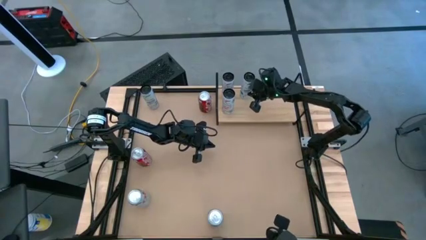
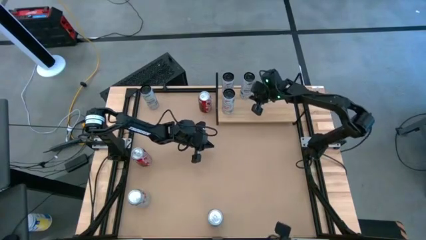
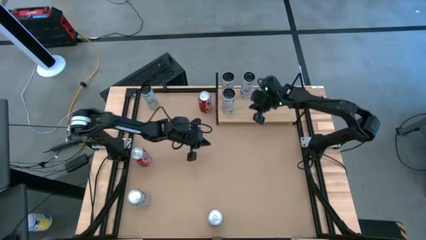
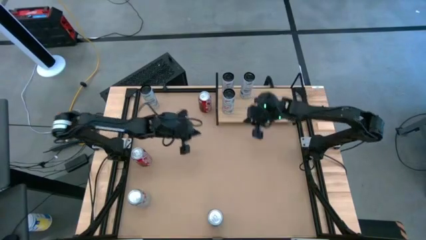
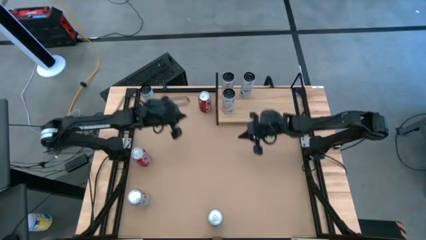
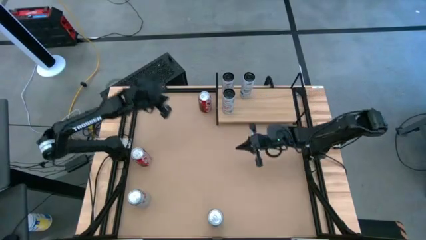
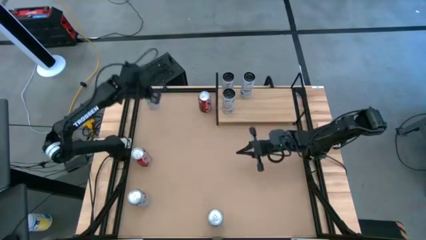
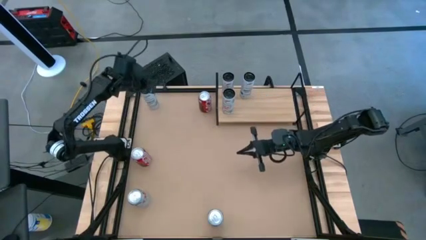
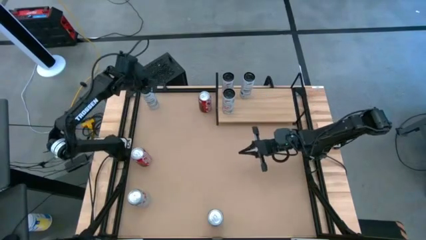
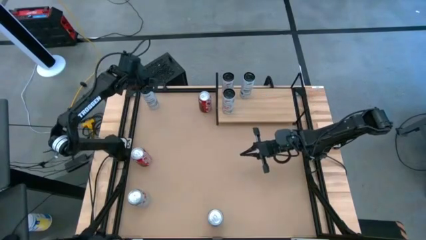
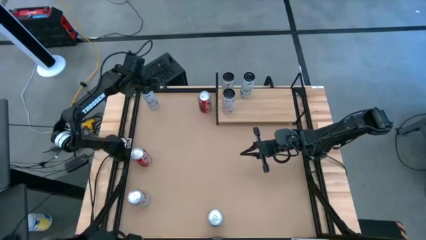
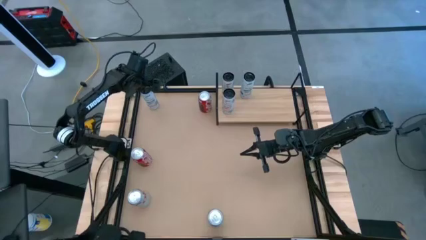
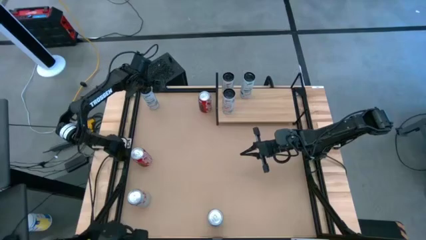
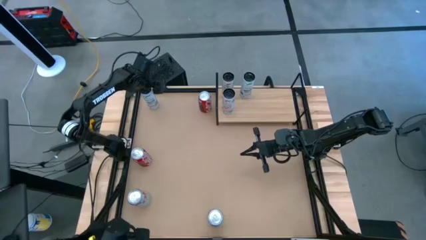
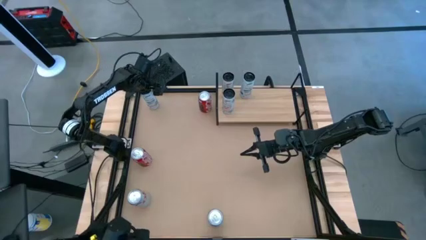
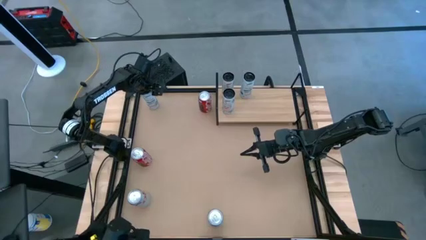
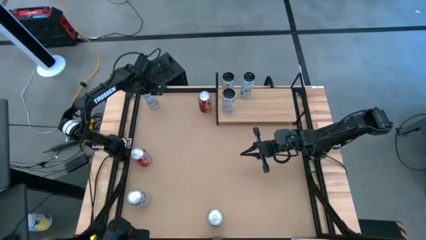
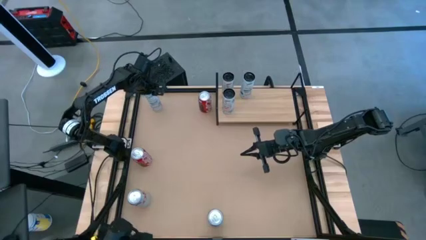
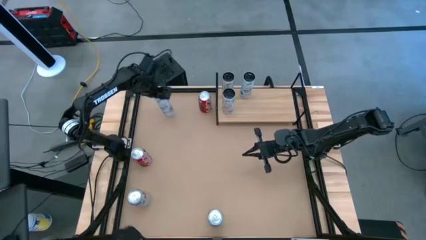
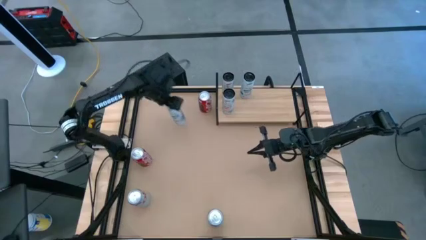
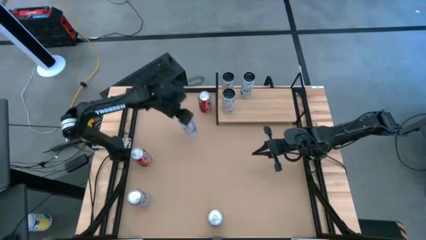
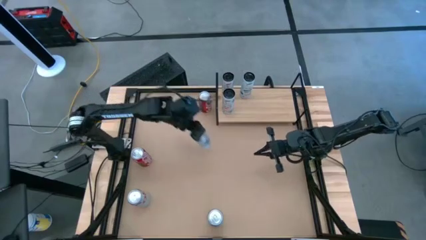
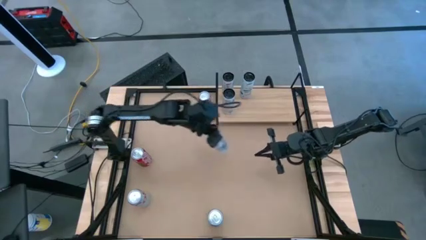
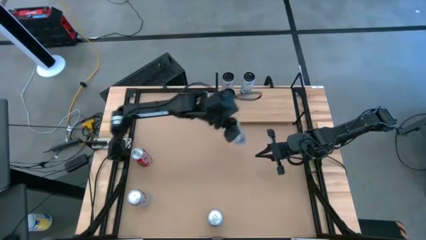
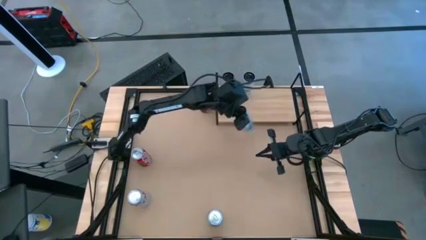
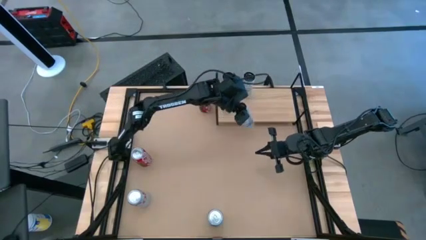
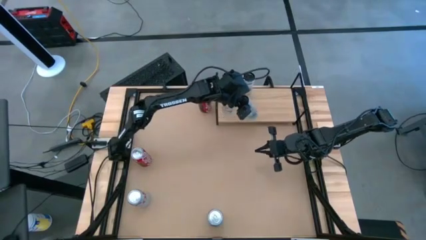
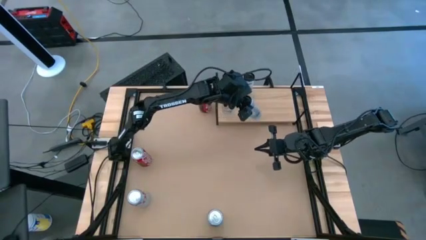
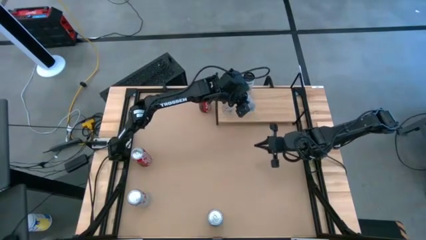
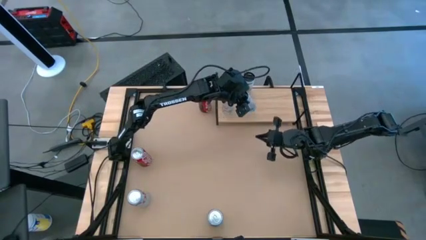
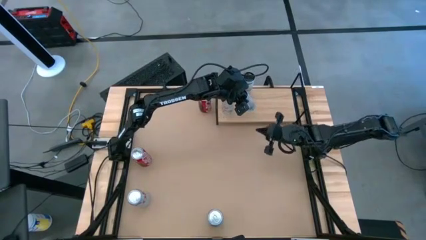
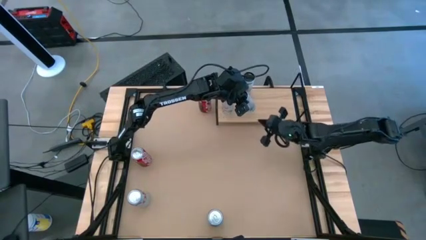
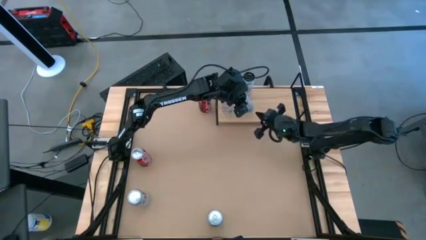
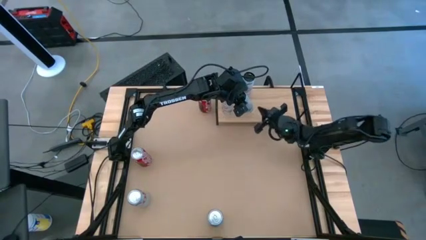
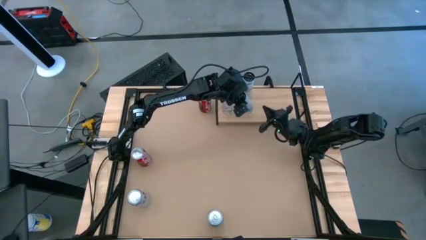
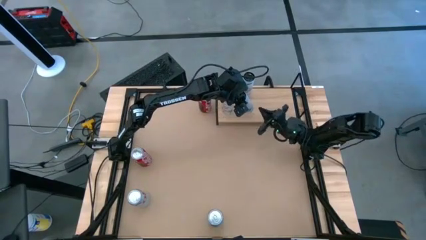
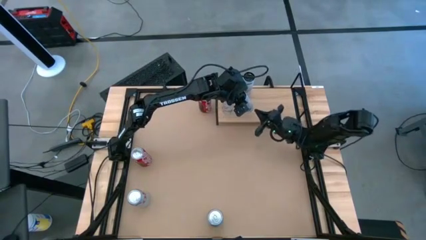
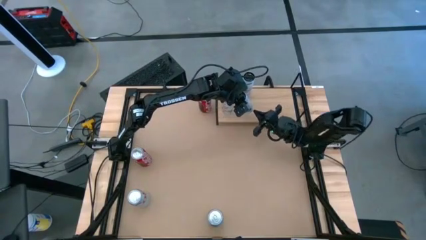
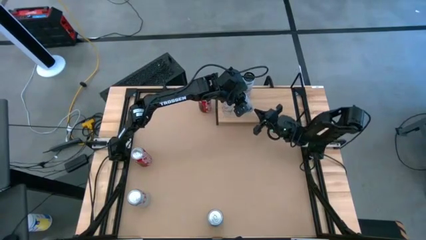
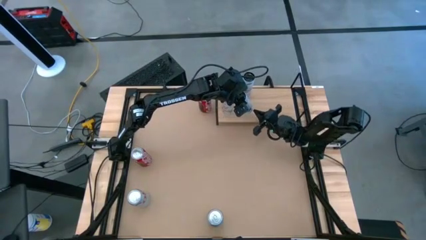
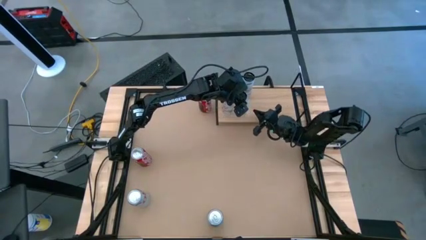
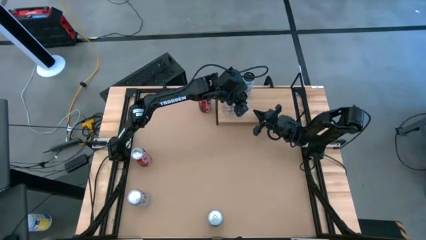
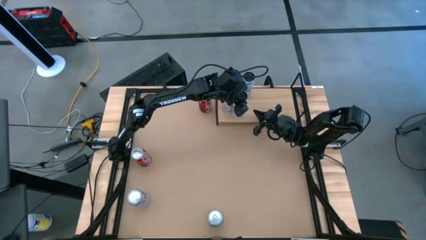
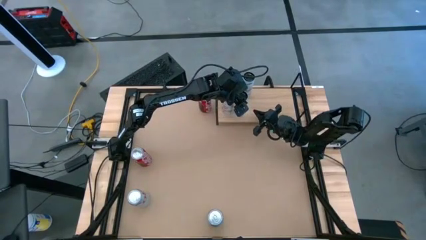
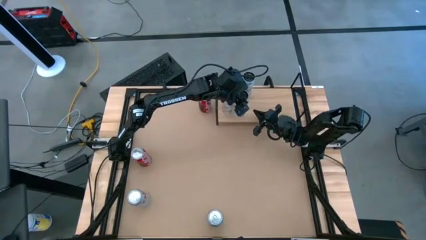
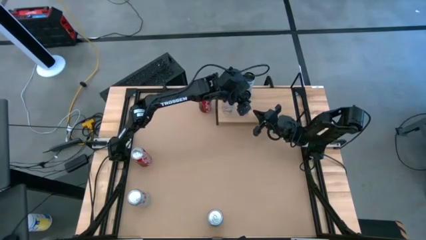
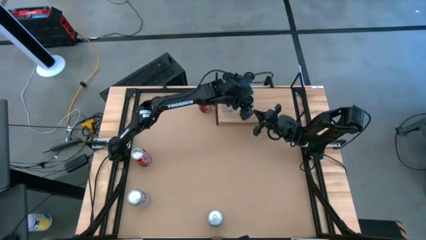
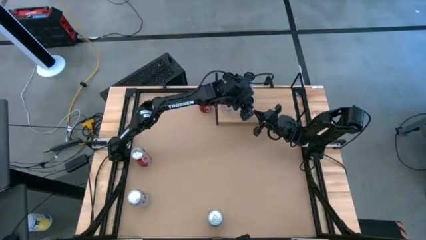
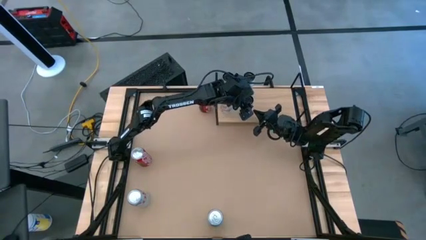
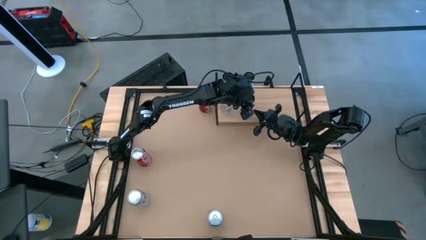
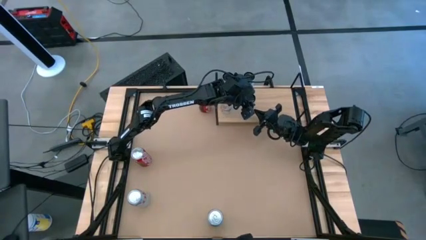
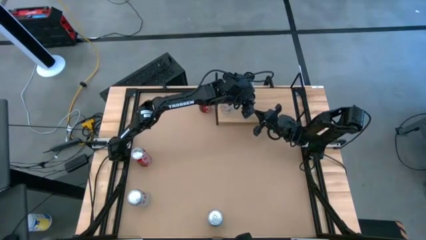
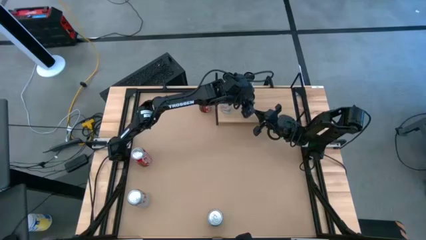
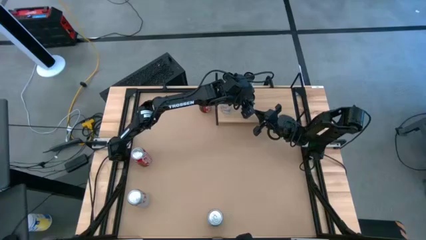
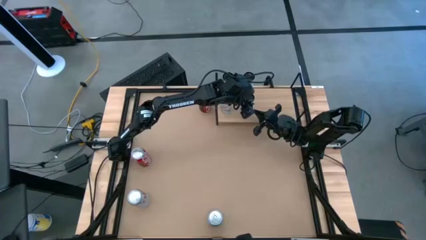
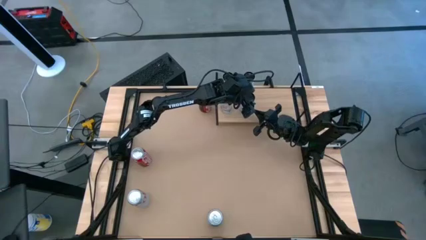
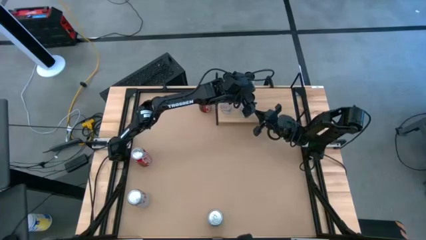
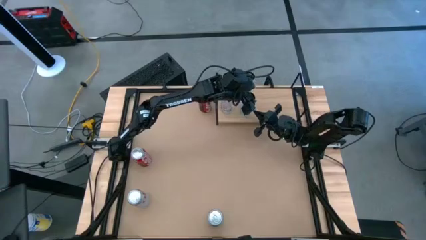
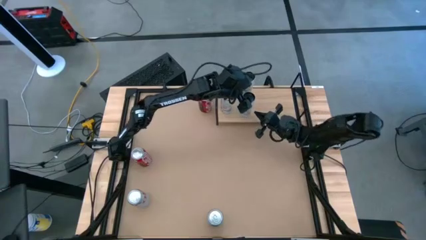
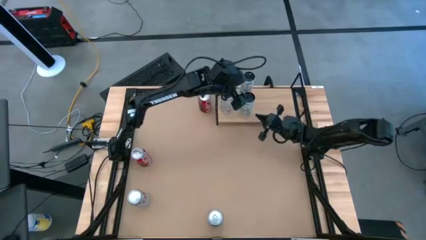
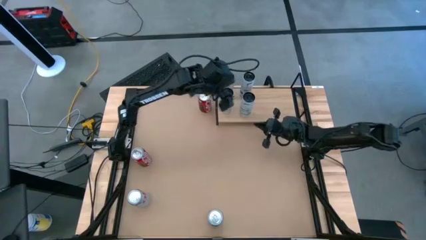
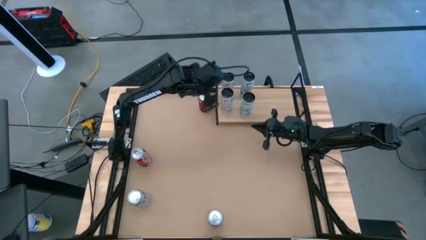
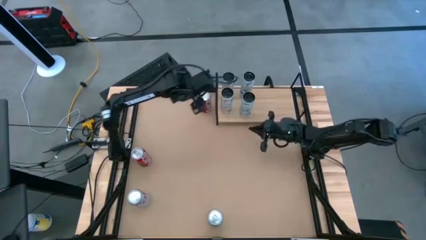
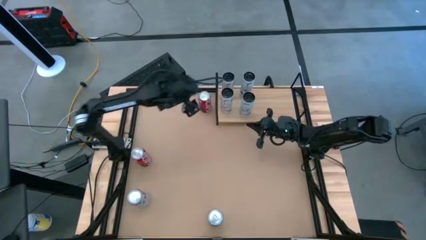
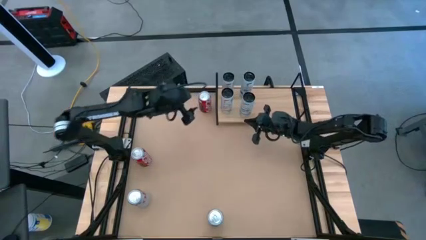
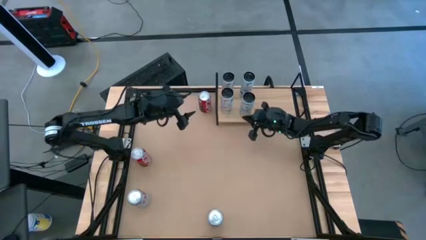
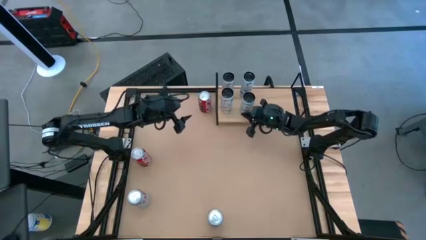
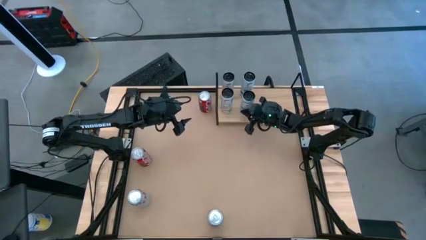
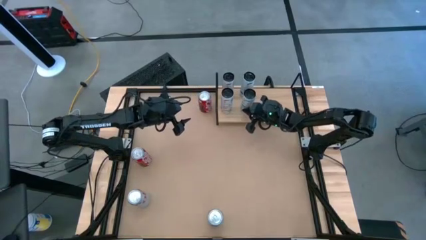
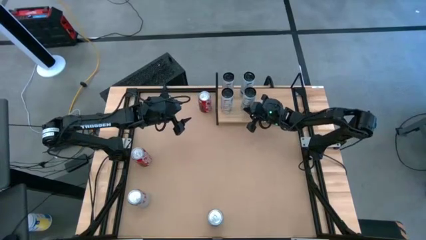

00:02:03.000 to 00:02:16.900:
Task: Place canned beverage on shelf
Put the white and blue soda can on the shelf align with the other white and blue soda can

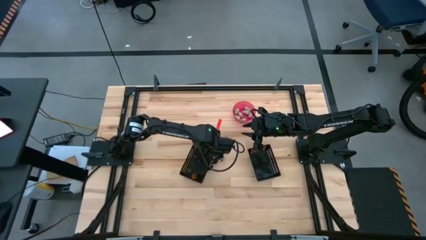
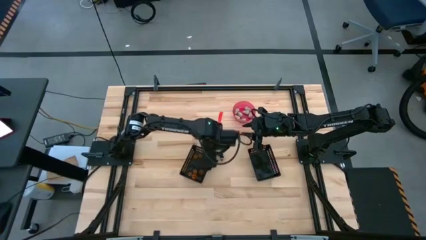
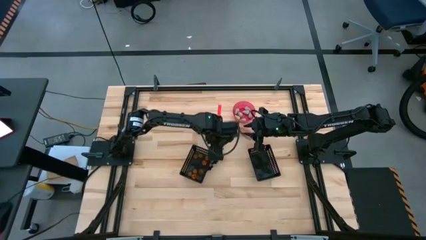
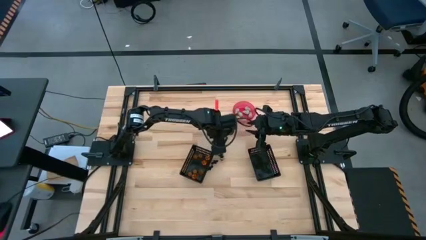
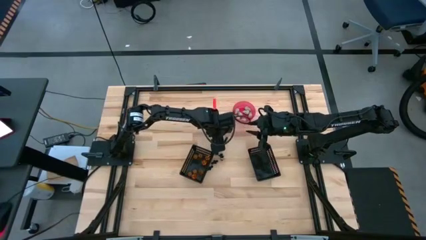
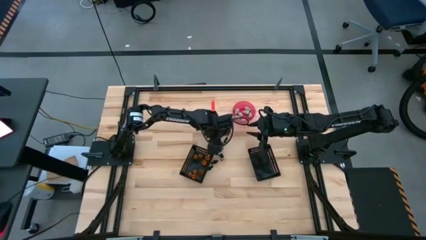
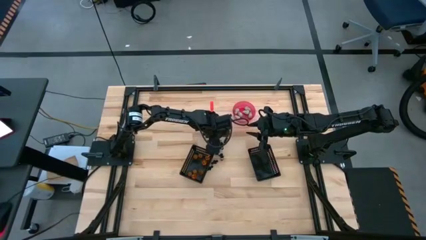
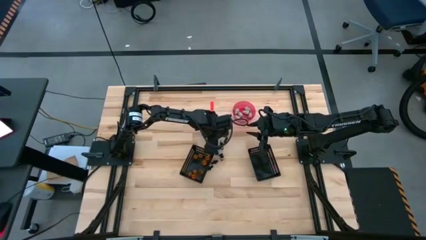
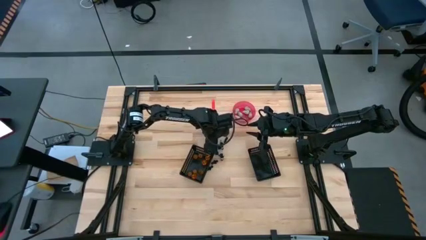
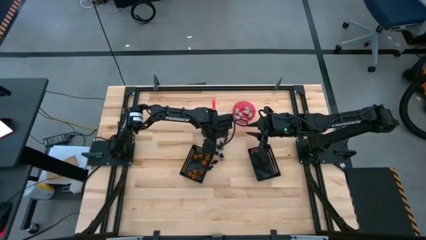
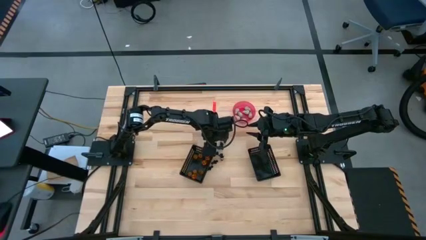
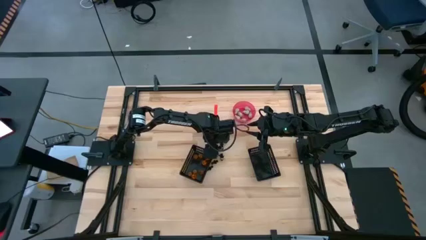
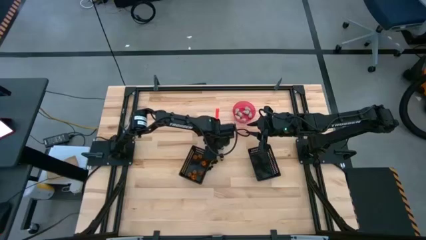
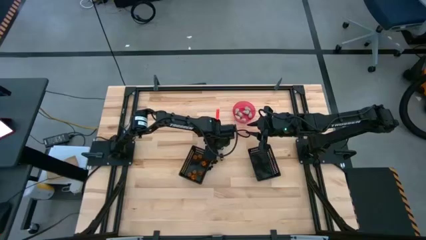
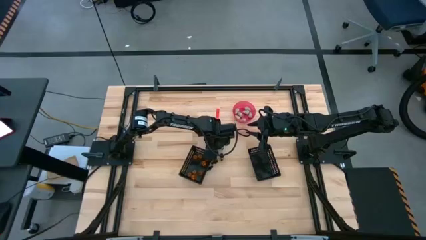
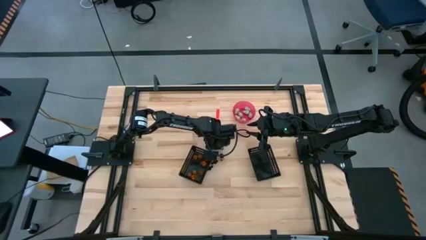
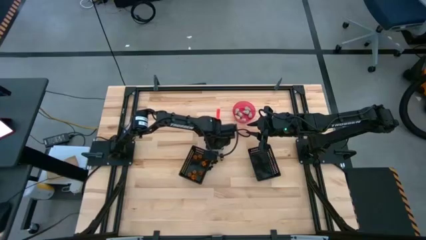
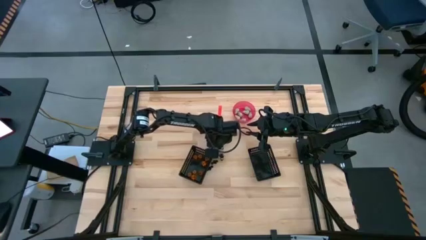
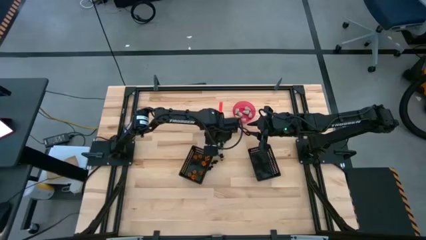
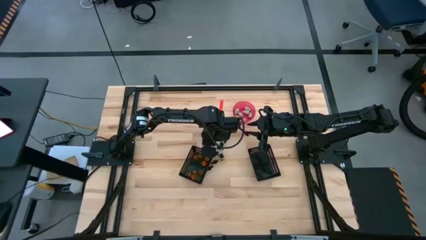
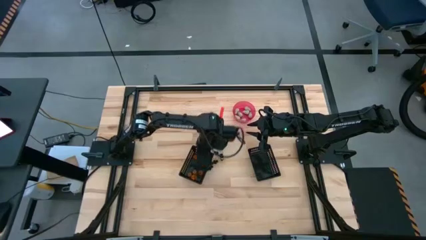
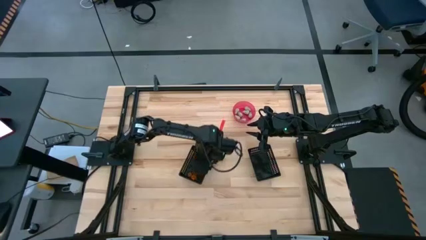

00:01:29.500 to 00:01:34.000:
Task: Sort Halloween decoration
Put the orange pumpkin toy into the left black bin
